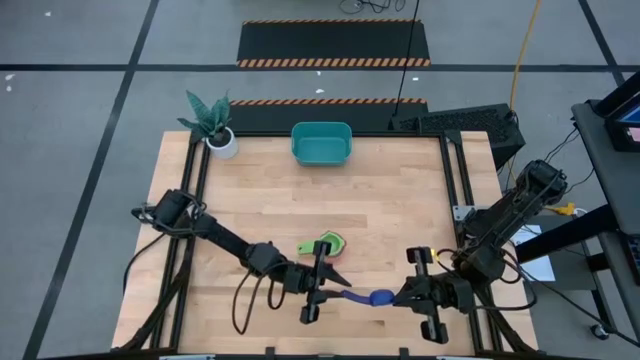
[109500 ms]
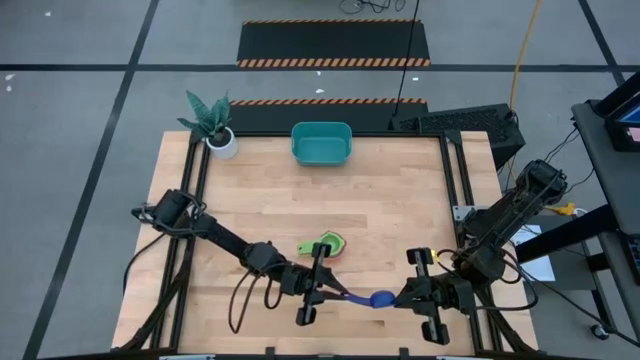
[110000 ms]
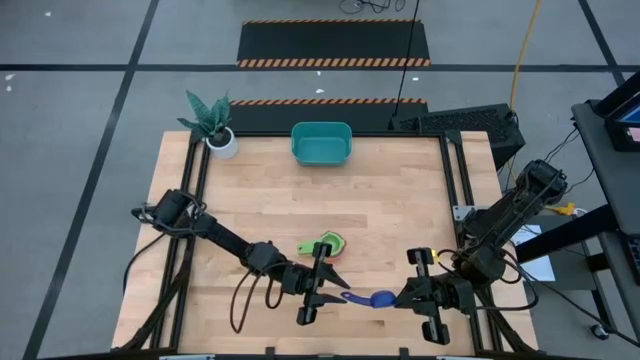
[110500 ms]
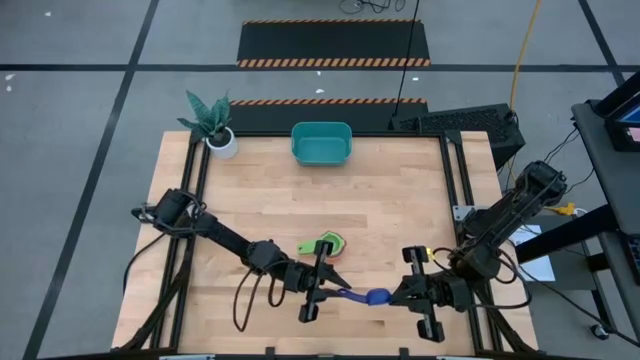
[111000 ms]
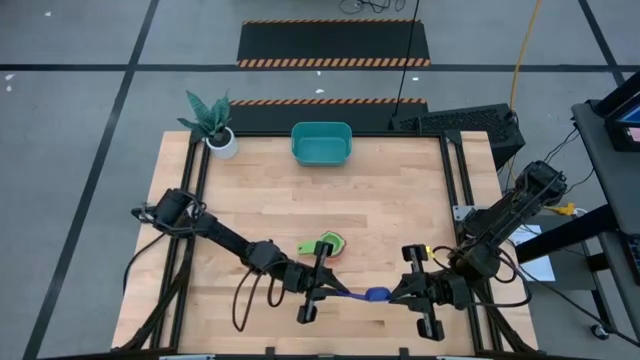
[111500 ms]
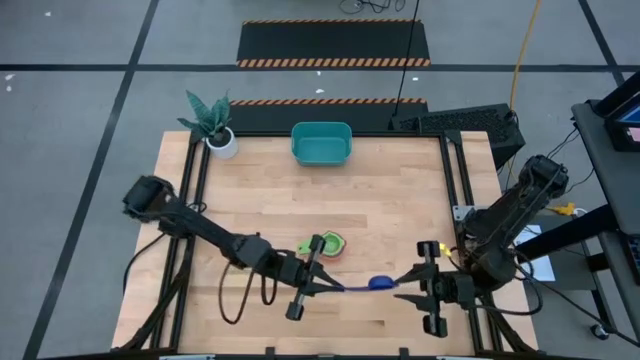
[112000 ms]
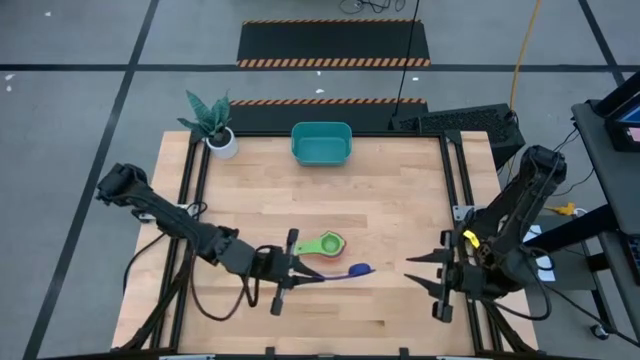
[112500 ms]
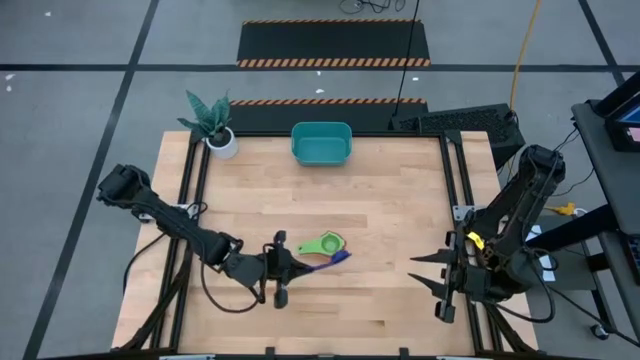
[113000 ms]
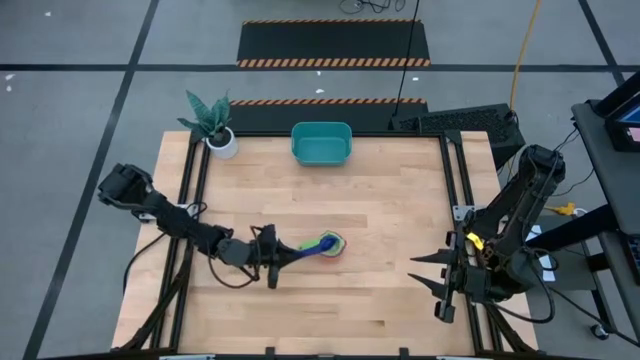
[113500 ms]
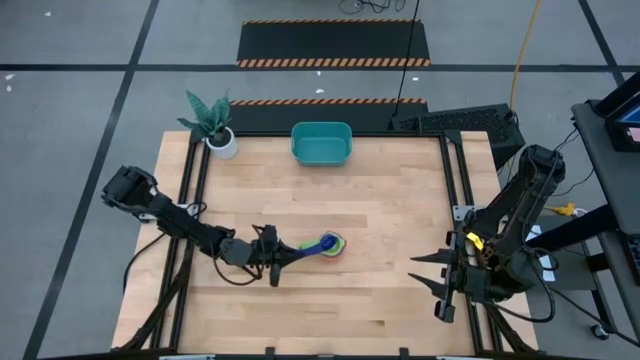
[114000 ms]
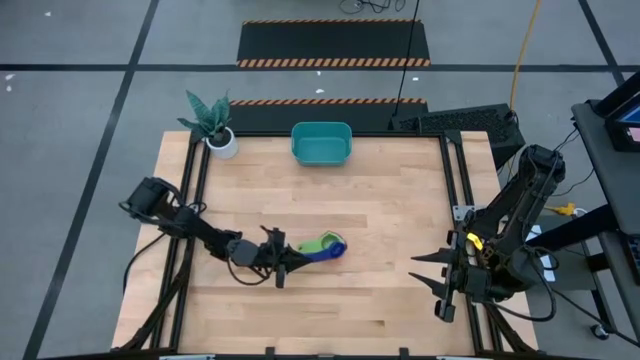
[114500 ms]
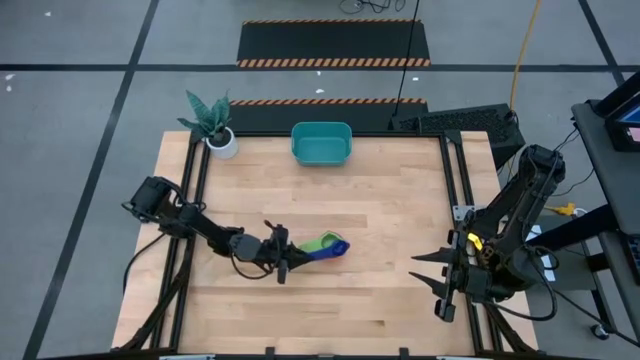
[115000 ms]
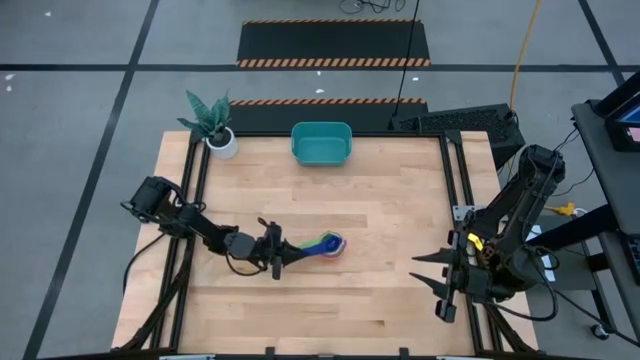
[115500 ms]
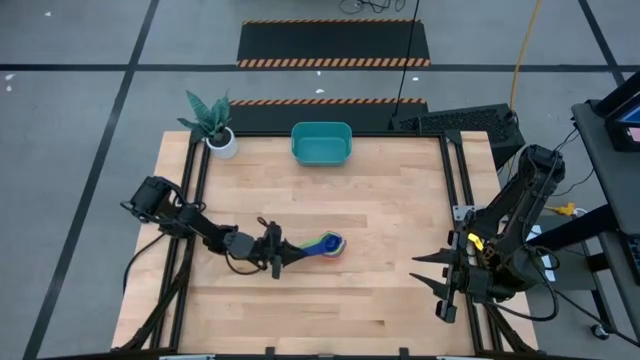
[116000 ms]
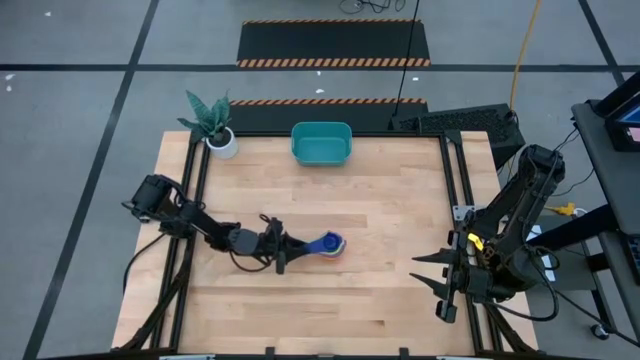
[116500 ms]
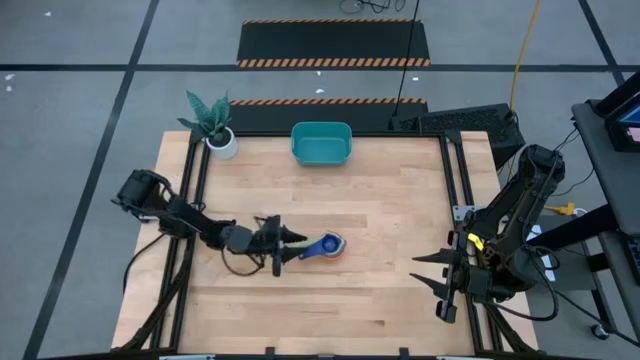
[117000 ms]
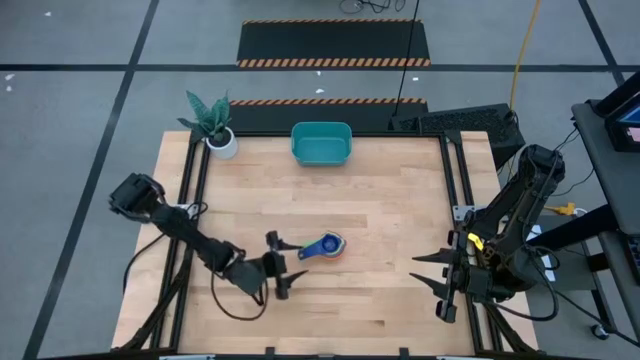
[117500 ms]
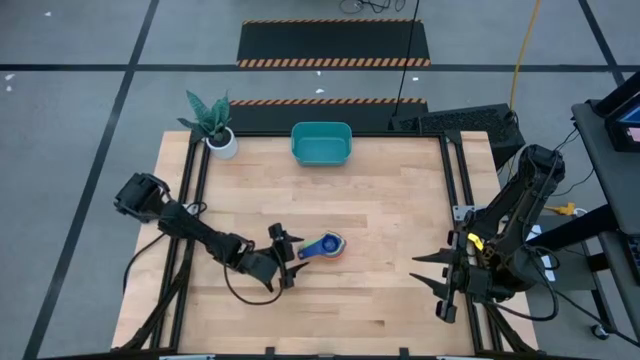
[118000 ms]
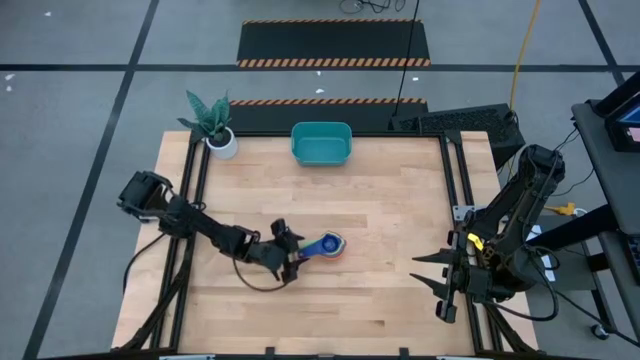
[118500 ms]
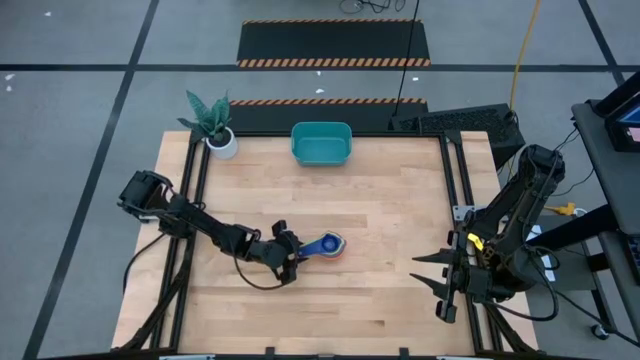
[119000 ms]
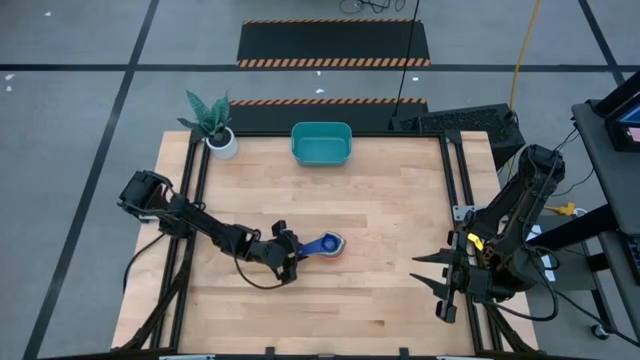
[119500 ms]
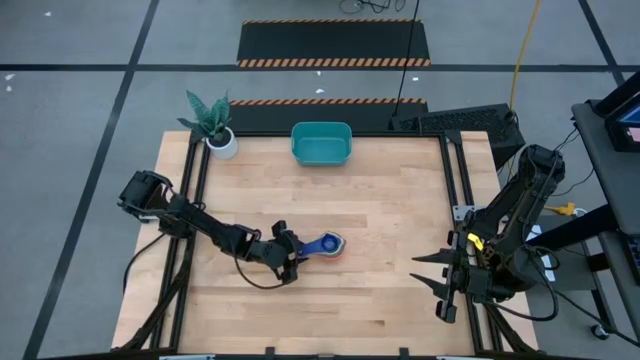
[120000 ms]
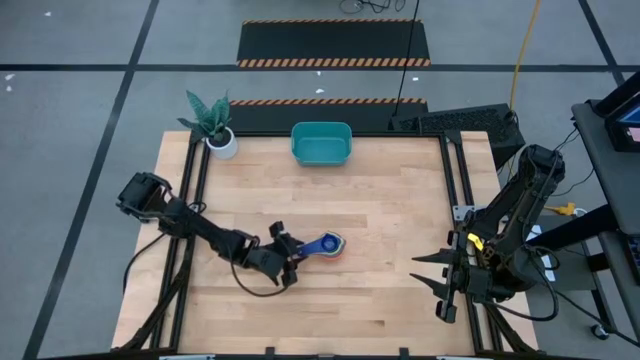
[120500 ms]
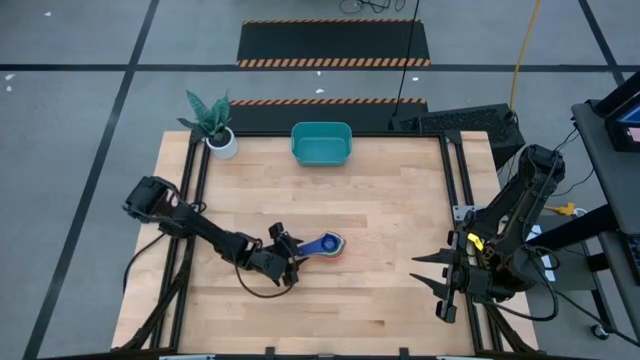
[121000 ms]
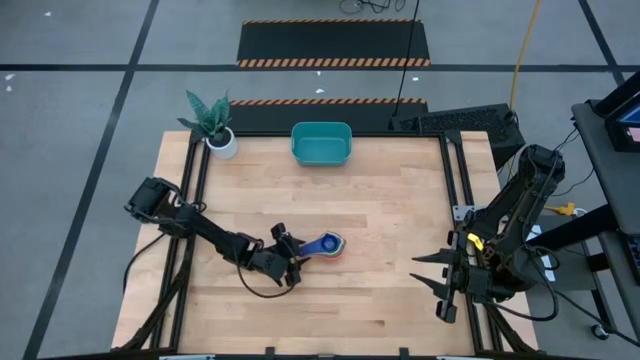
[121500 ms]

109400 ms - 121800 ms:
Task: Nest measuring cups in basket
Stack the dark blue measuring cup on top of the green measuring cup

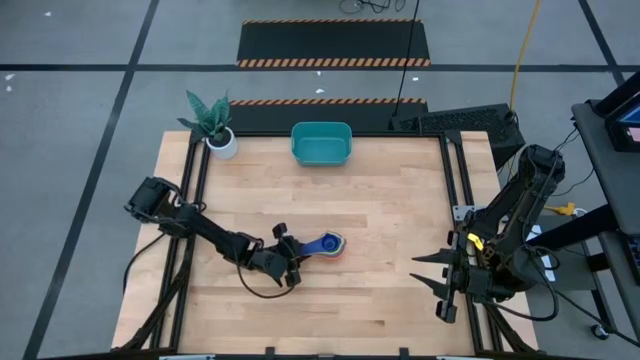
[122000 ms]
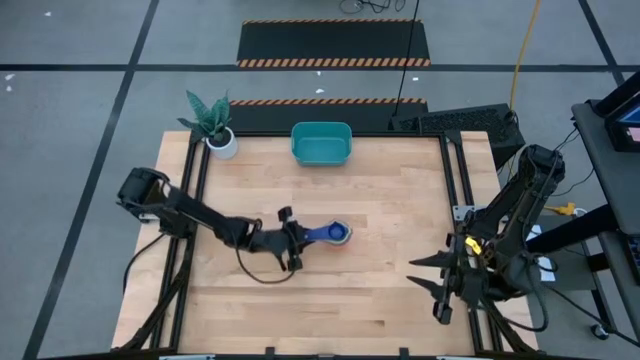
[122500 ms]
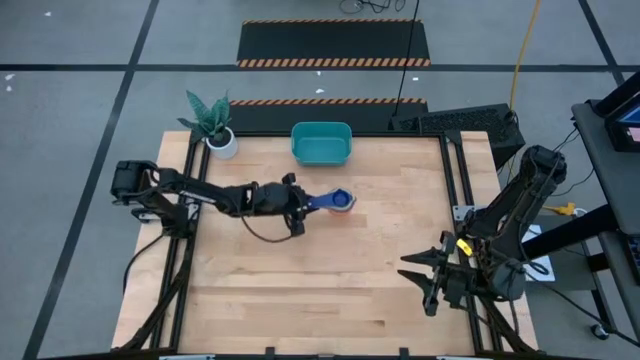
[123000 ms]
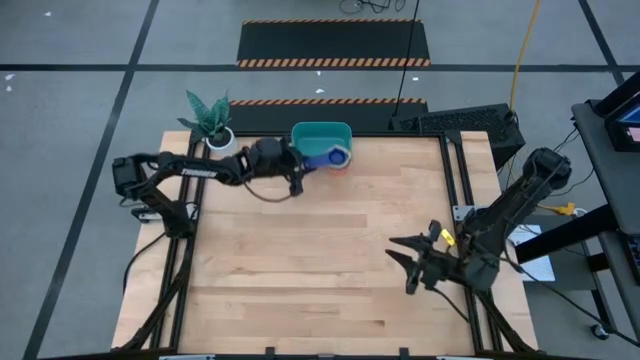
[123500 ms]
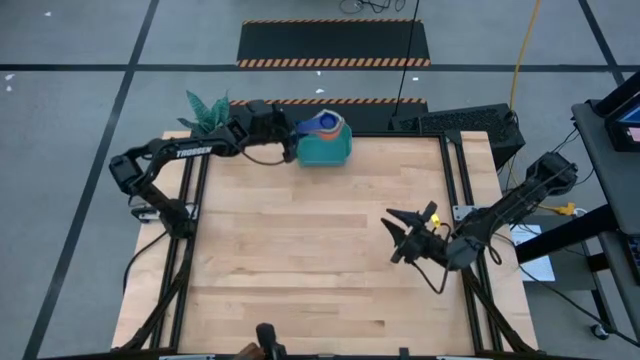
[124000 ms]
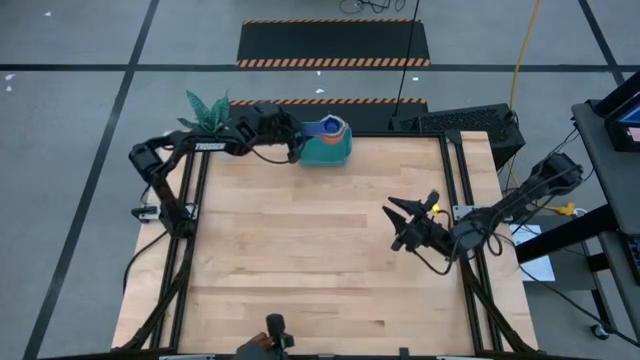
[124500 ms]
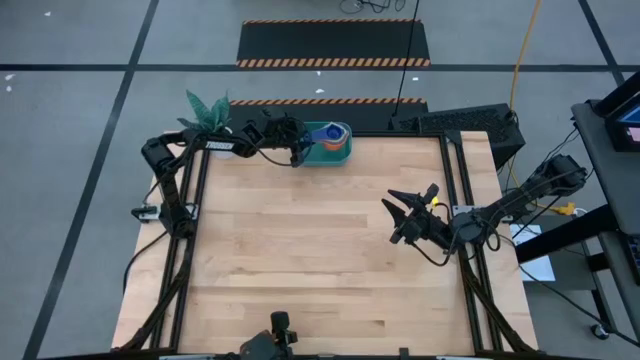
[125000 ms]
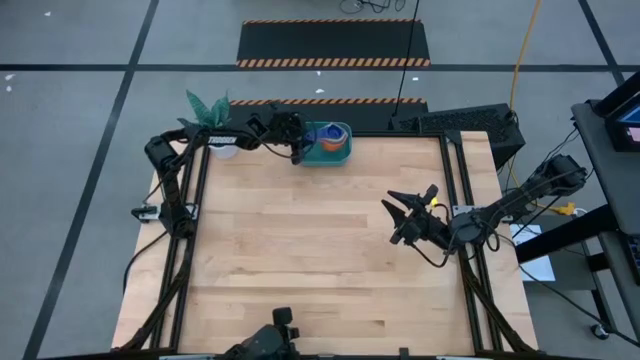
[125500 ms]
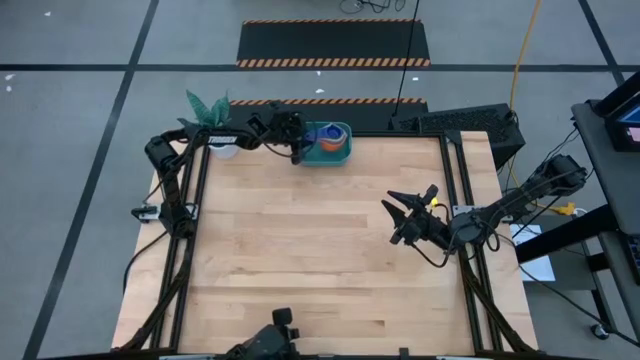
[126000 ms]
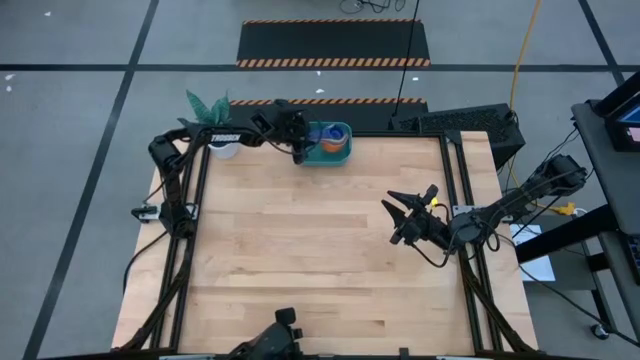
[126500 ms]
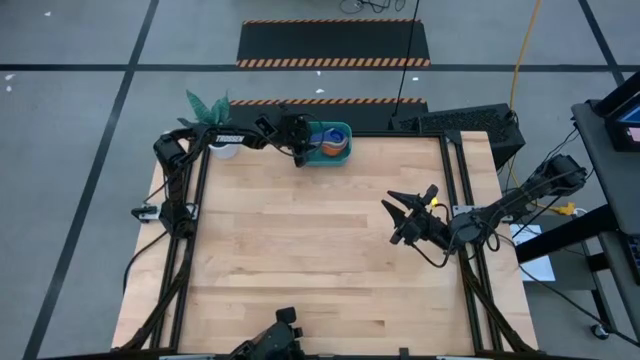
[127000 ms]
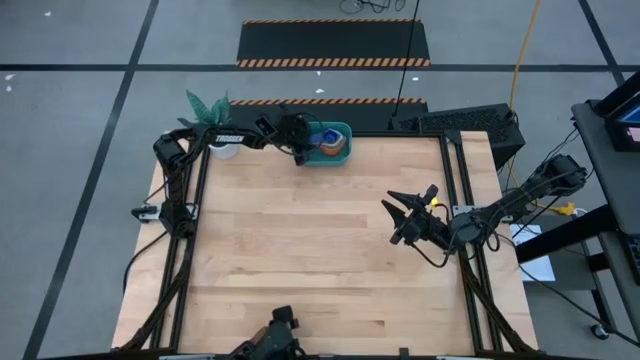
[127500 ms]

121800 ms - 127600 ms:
Put the stacked measuring cups into the bin

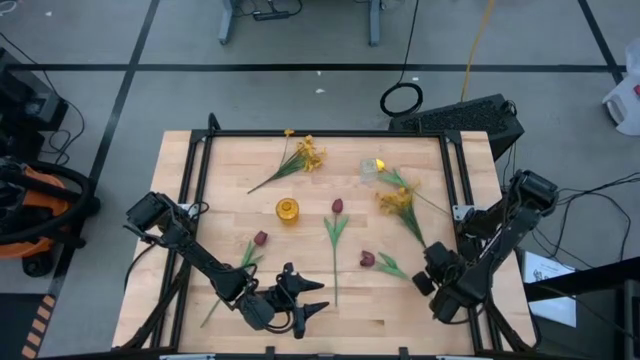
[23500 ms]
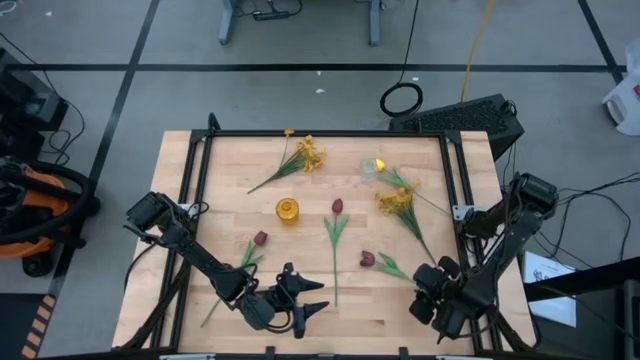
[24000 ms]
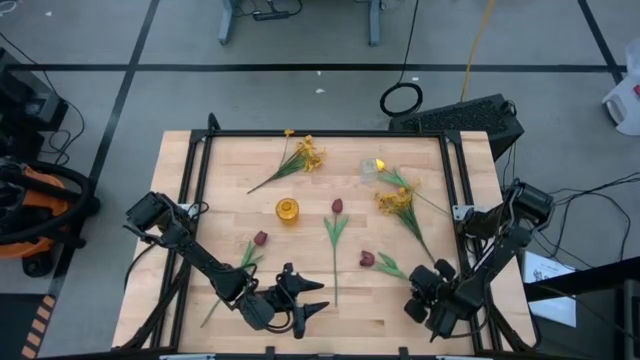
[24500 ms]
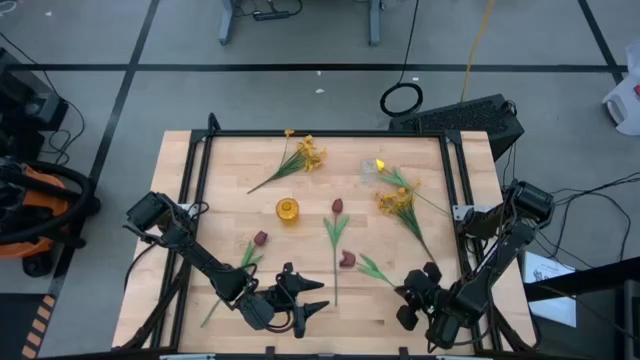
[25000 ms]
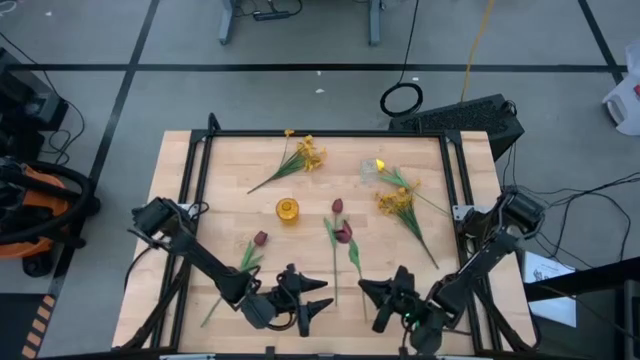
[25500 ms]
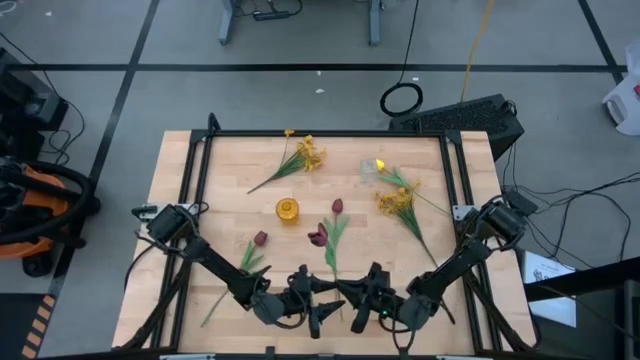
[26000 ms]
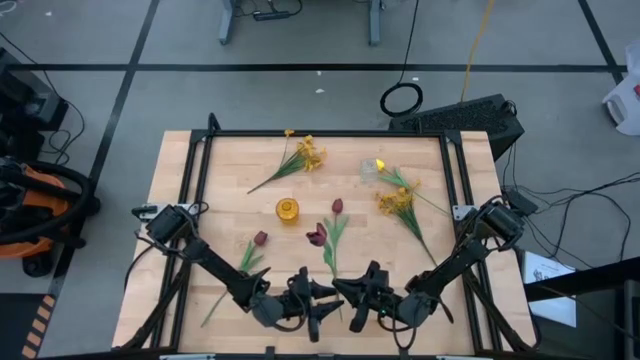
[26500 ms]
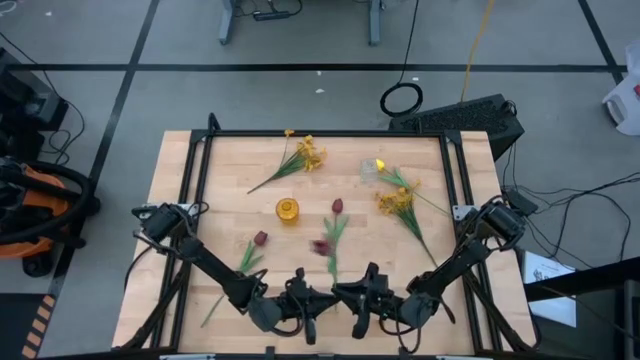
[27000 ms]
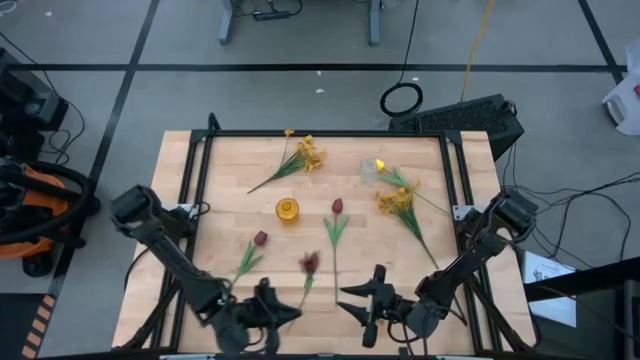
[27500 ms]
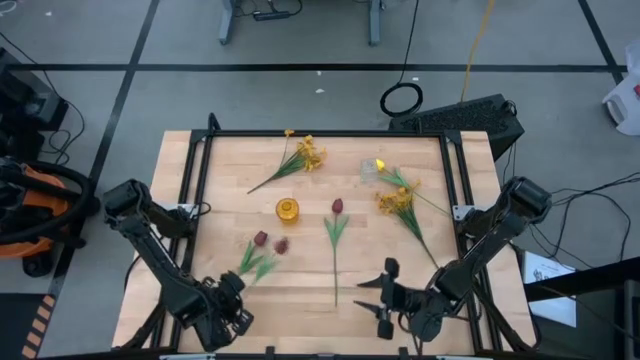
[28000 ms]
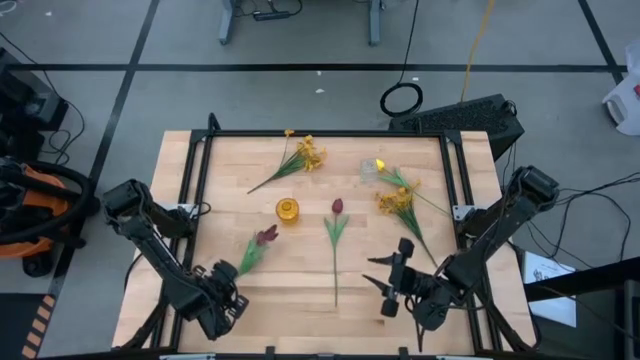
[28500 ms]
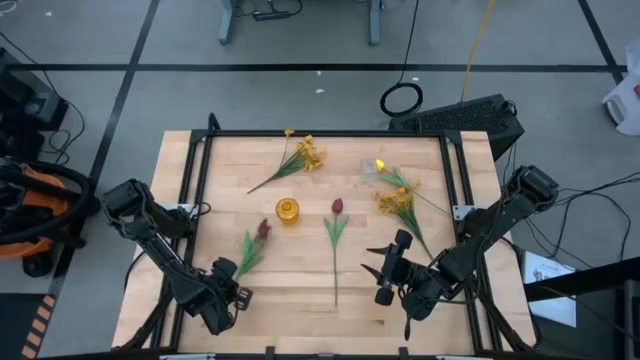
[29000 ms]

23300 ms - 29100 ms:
Task: Sort flowers into vase by color
Move the right violet tulip to the middle left of the table
